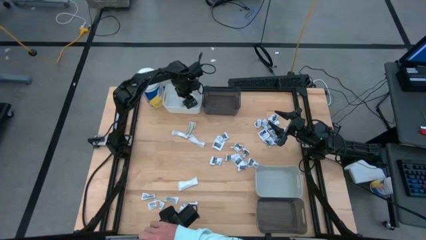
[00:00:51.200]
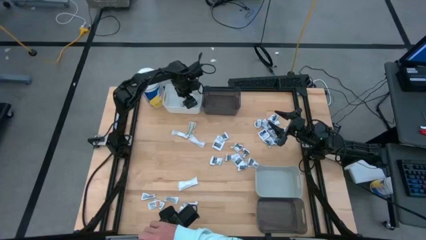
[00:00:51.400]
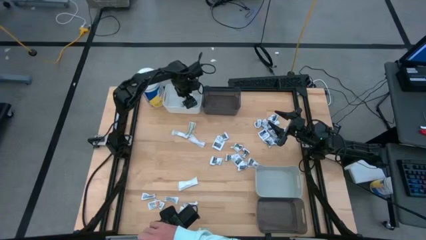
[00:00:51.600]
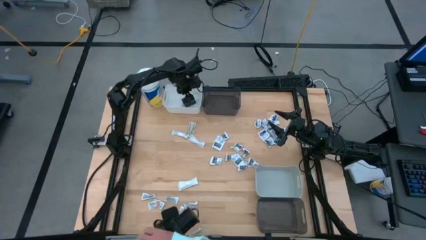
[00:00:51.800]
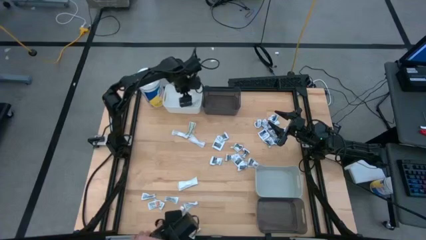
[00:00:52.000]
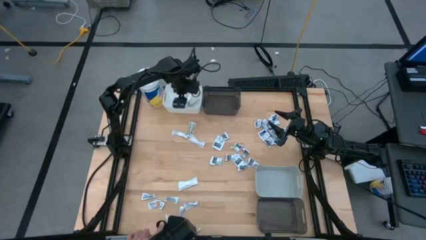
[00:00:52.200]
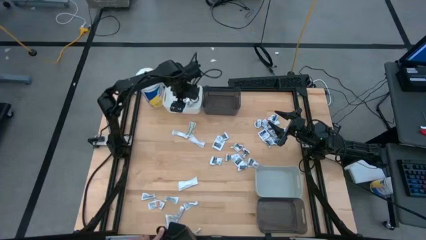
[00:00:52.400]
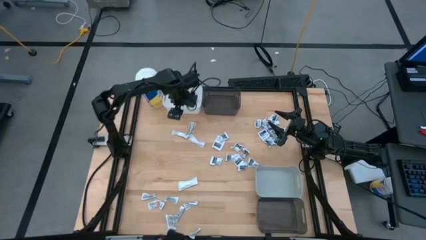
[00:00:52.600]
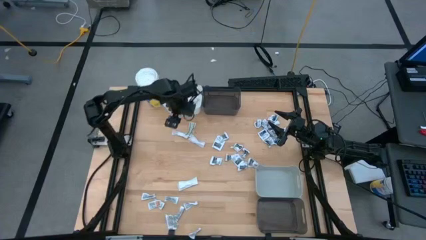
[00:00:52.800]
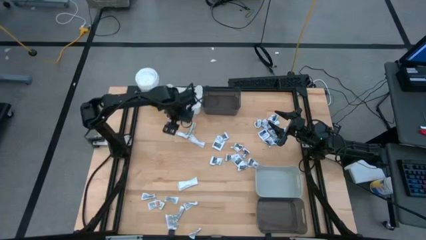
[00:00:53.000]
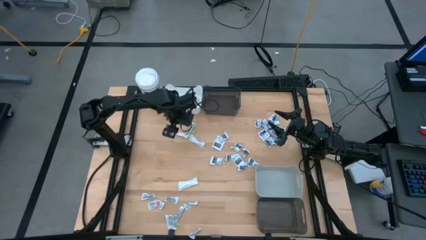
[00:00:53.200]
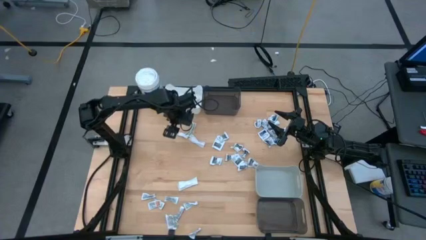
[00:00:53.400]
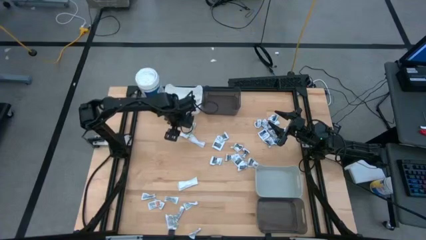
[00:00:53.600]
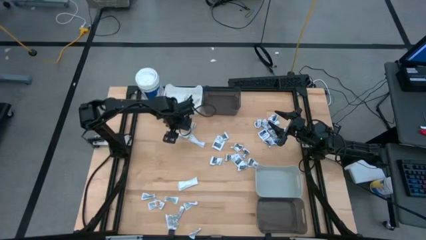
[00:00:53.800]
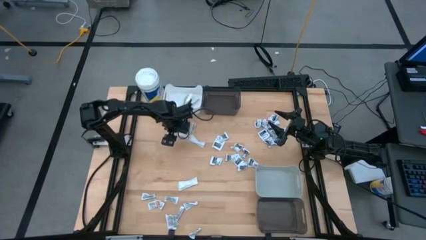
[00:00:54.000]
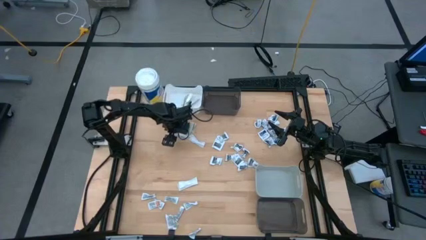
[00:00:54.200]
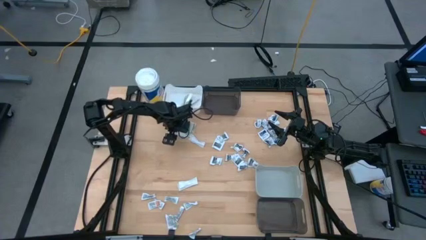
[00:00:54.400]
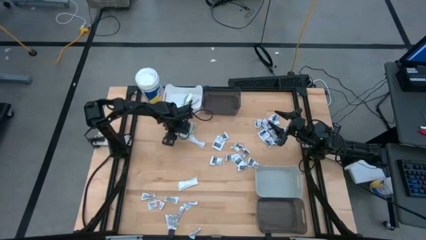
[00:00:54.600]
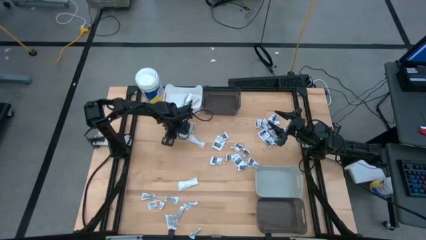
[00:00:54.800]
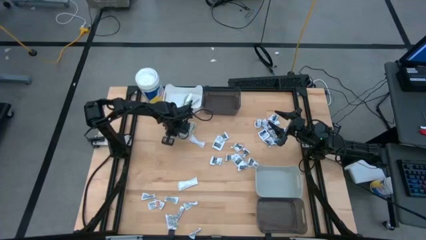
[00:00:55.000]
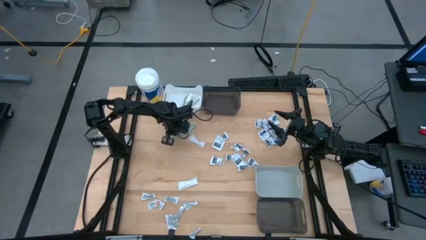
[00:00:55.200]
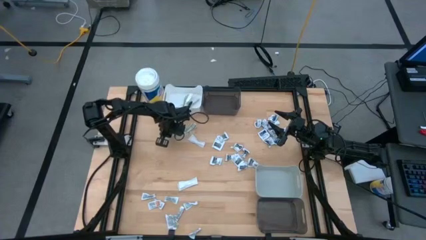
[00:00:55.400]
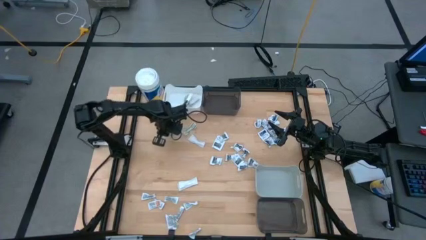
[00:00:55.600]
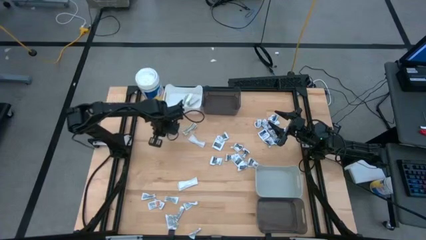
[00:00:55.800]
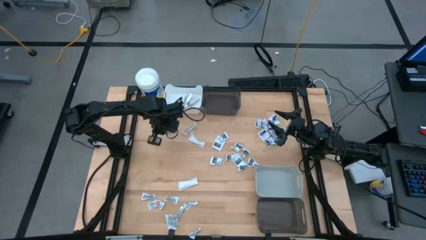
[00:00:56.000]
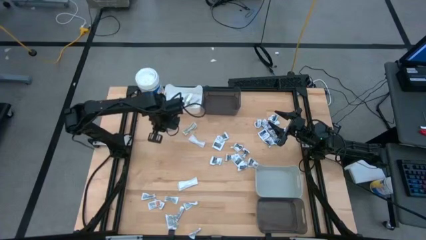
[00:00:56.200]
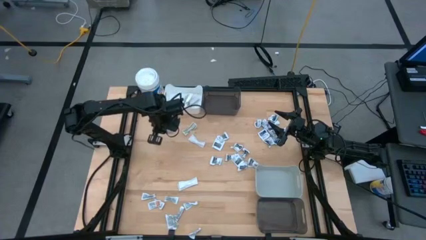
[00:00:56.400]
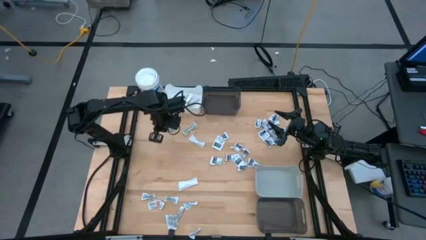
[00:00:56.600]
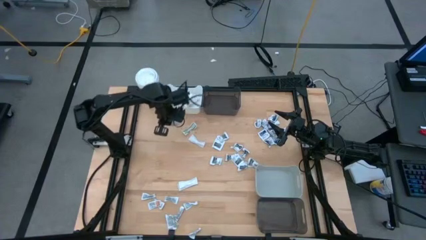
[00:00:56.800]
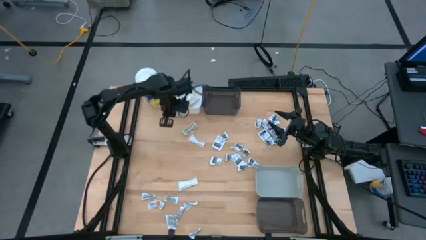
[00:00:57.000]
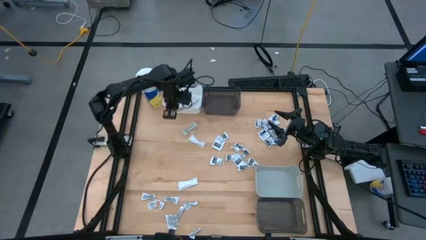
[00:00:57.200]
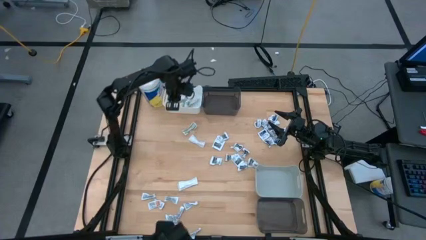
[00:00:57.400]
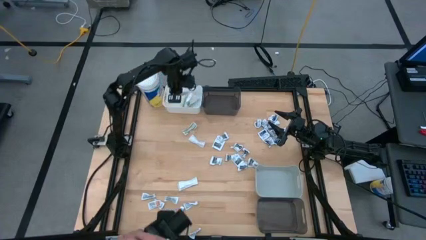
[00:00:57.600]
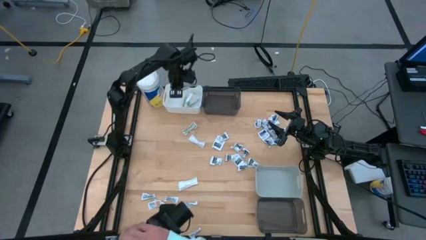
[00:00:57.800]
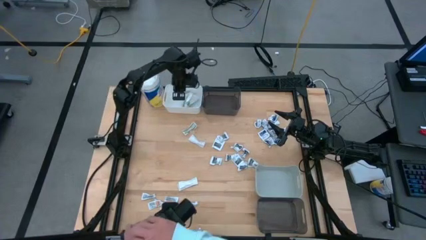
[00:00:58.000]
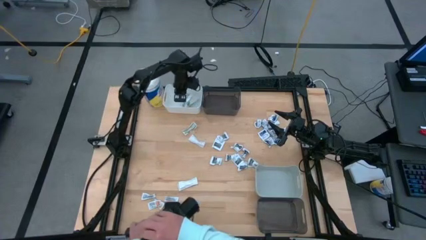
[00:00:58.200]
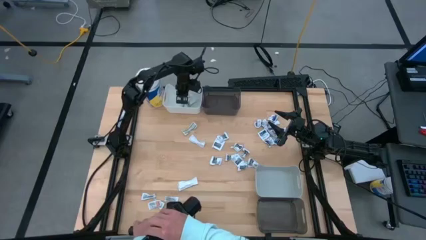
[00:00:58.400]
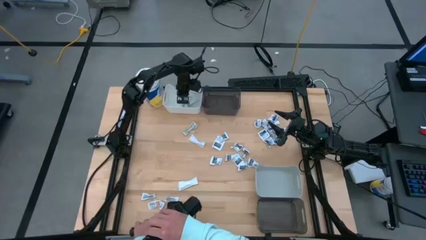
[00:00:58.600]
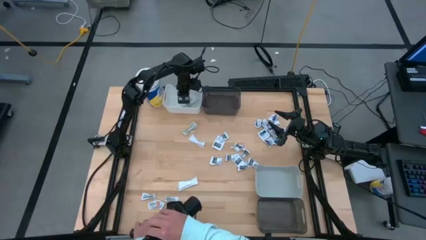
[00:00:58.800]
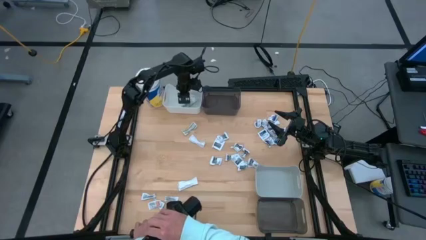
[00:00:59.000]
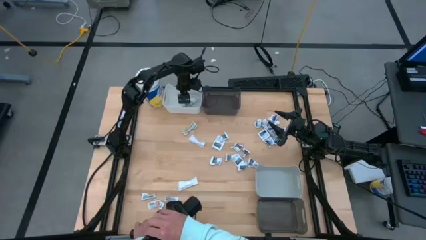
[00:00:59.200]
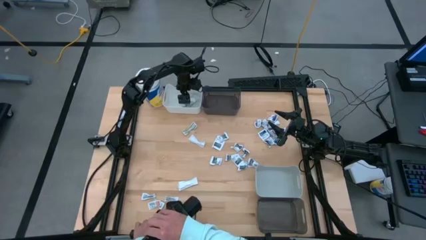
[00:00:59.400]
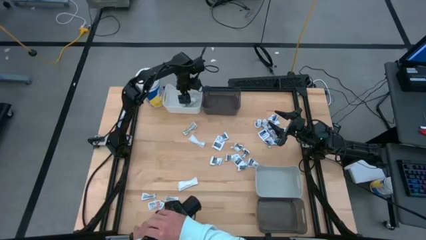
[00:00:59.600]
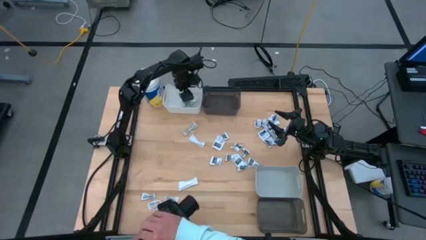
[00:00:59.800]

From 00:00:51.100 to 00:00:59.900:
Task: Pick & Place First Aid Supplies
Put the green bandage into the white bin

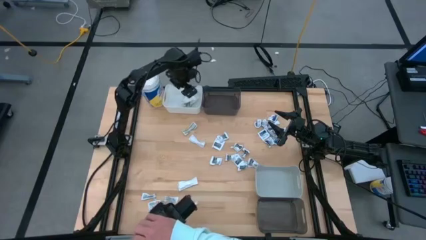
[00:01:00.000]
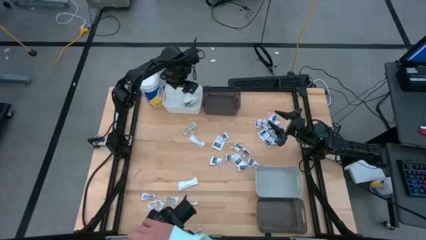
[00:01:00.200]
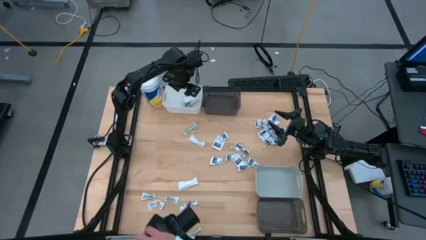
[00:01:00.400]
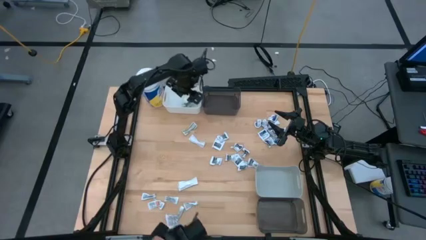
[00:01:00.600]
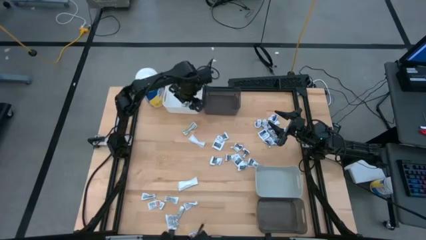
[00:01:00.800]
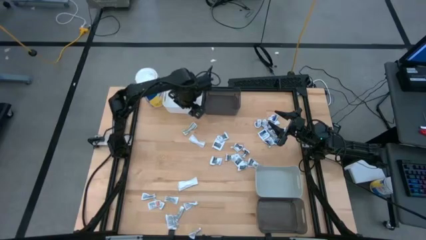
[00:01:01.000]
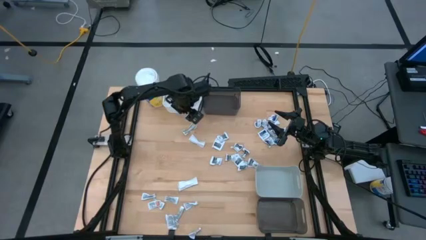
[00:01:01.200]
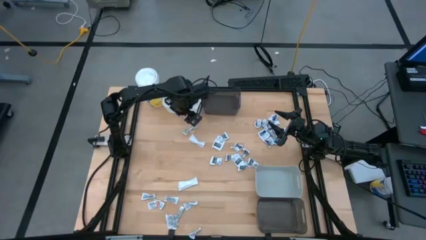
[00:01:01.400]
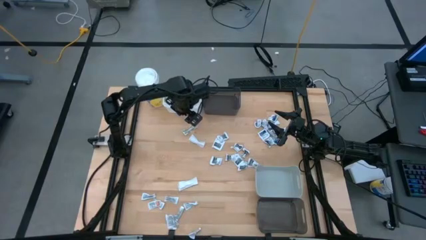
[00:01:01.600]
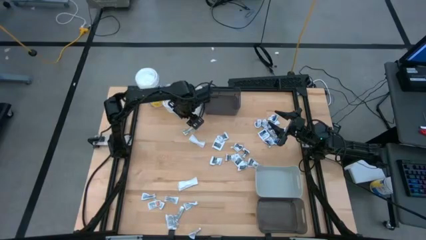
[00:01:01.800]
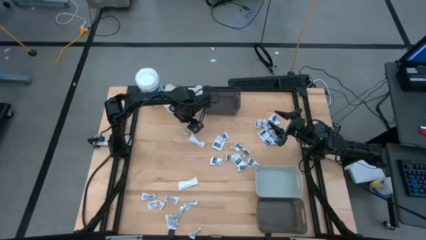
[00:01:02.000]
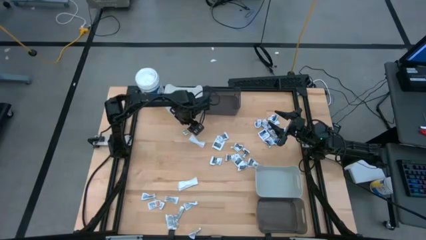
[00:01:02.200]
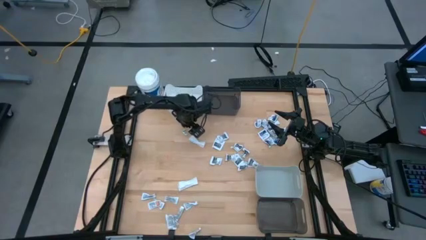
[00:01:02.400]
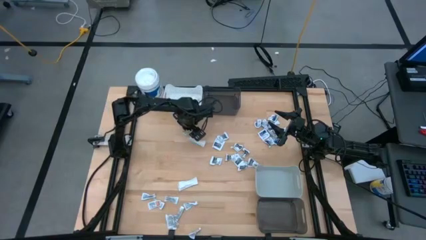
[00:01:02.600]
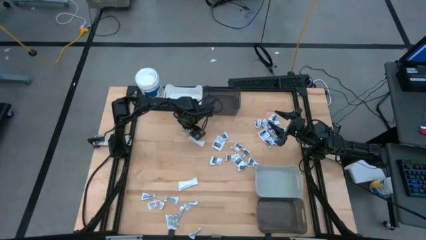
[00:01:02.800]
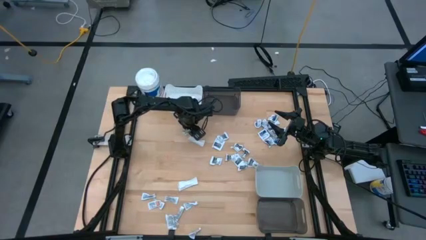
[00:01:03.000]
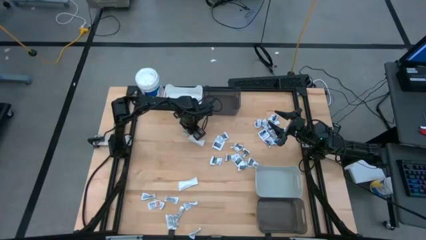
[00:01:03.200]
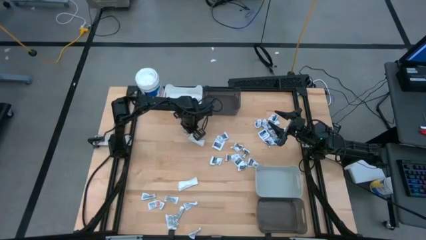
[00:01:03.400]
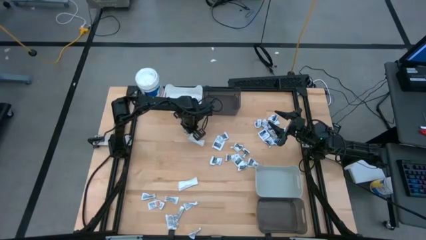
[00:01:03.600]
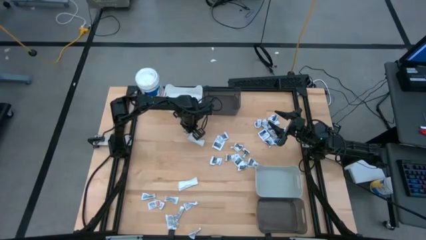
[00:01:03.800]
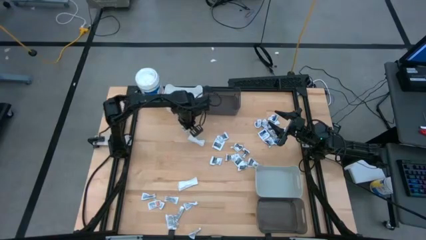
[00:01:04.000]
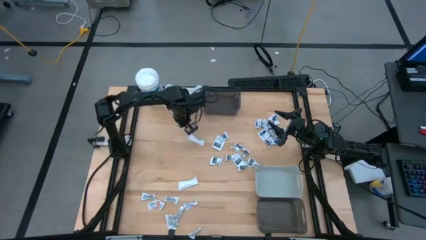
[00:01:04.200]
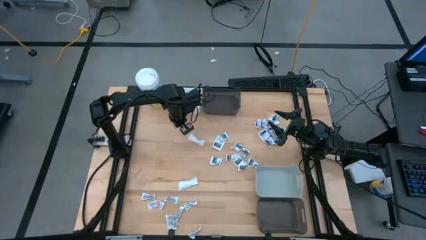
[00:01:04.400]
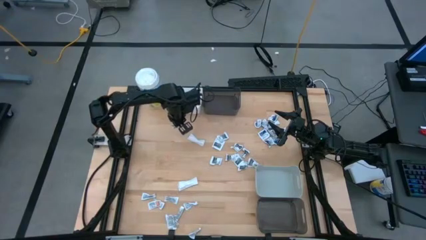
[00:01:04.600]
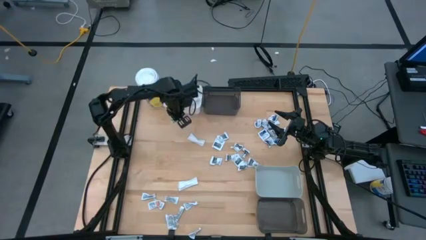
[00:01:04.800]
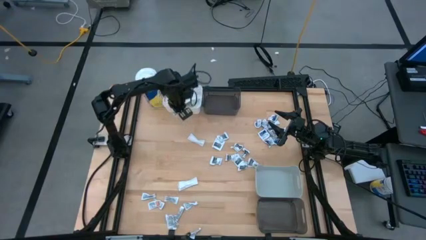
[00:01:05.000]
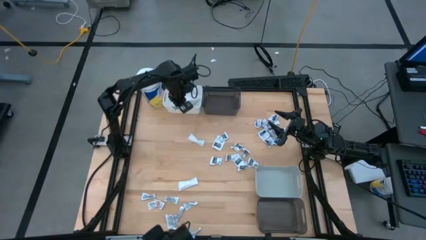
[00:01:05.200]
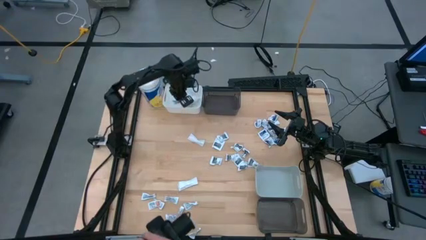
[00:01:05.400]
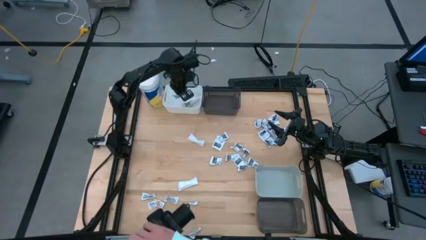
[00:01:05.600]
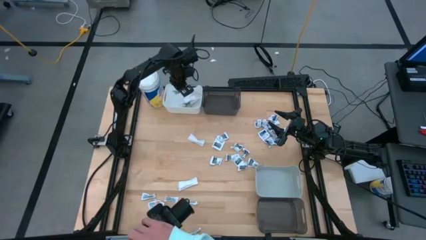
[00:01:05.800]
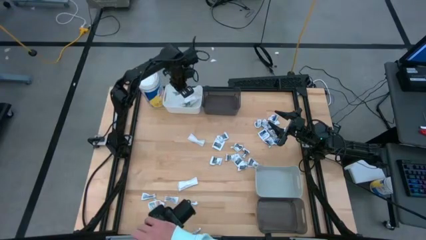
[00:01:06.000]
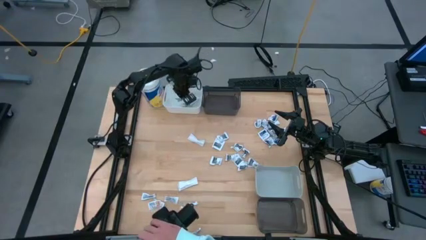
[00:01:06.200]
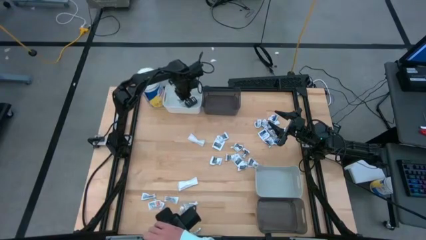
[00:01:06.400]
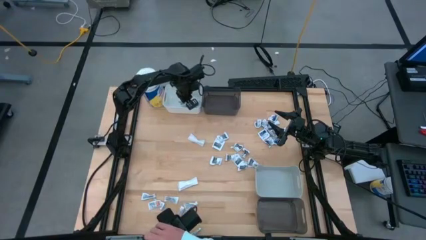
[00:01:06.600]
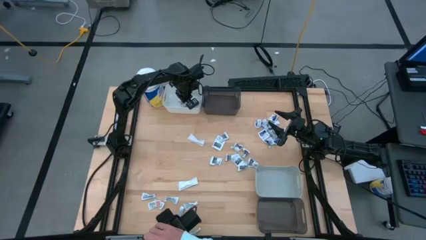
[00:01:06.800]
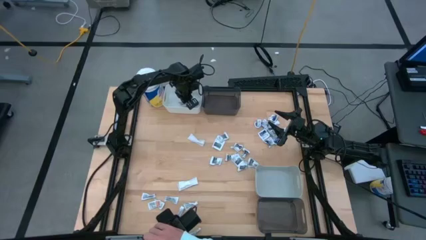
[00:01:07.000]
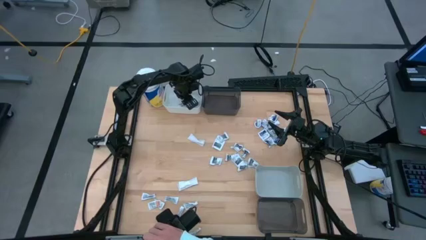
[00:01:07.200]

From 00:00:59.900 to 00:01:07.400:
Put the green bandage into the white bin
